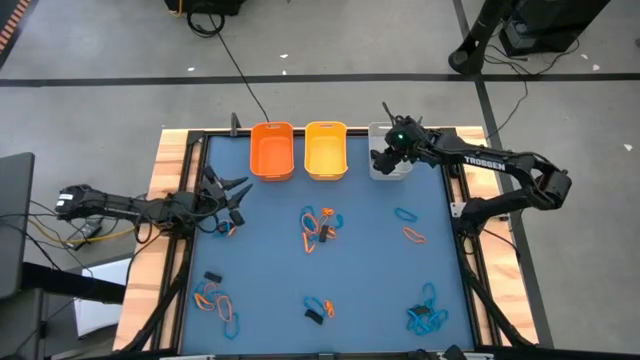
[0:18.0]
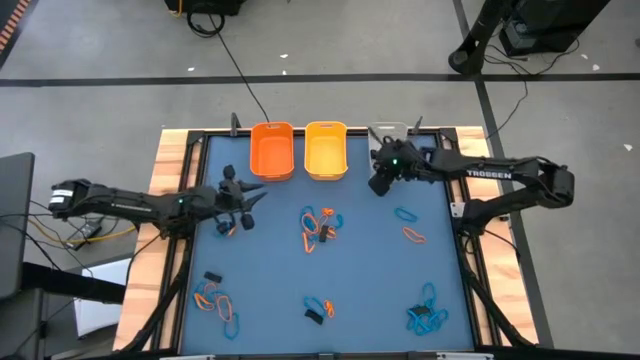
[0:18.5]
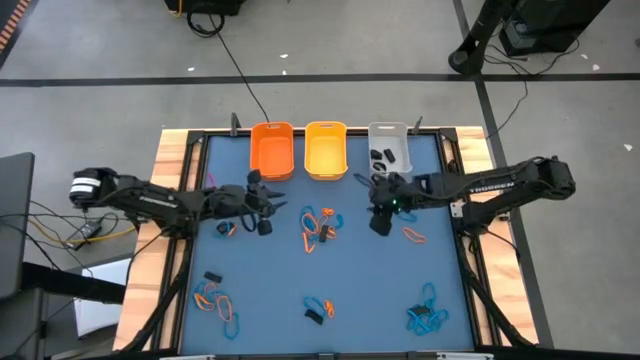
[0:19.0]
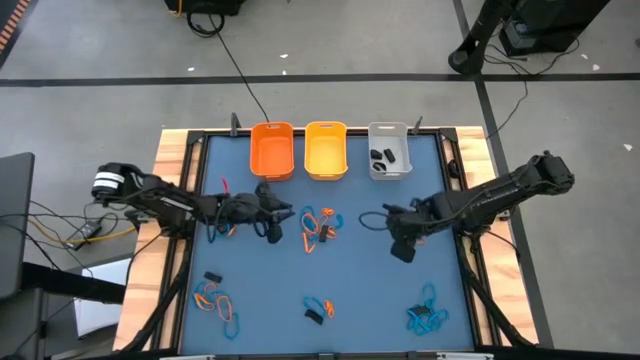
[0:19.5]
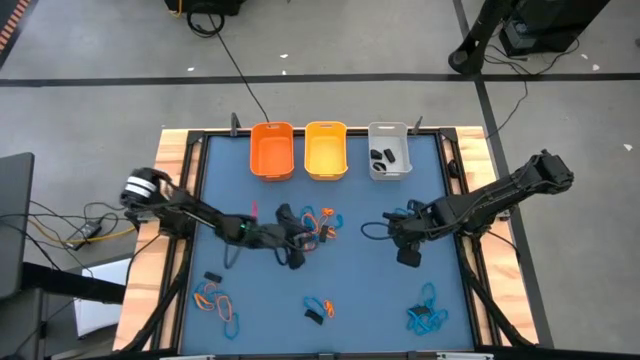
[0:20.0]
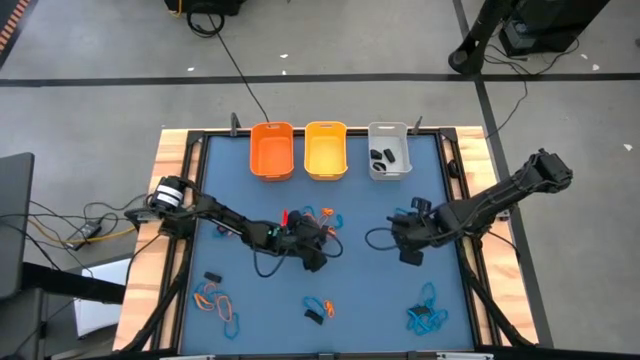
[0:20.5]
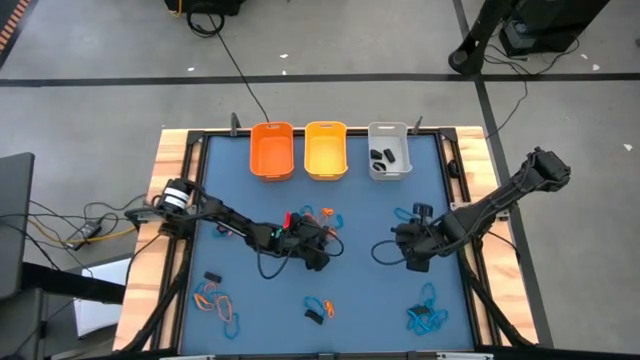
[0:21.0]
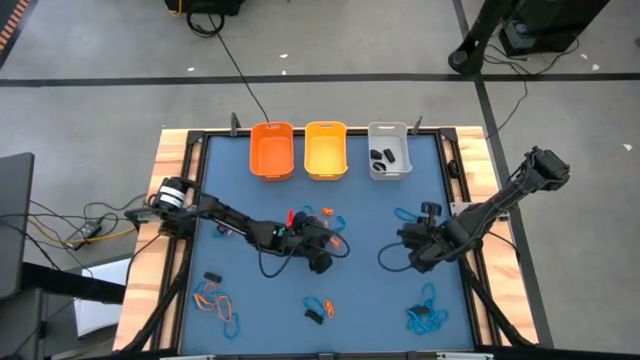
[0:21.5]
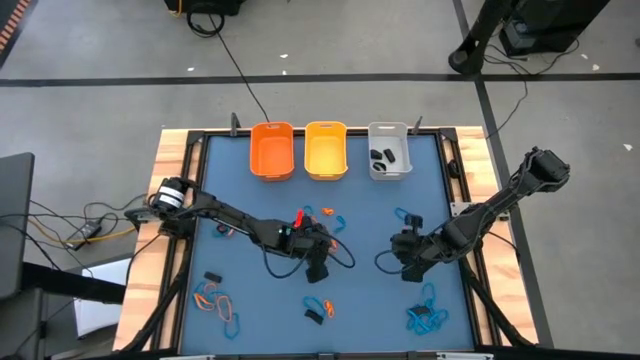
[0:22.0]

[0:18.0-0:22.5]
Task: Sort rubber bands into baskets
Put the black rubber band into the gray bin

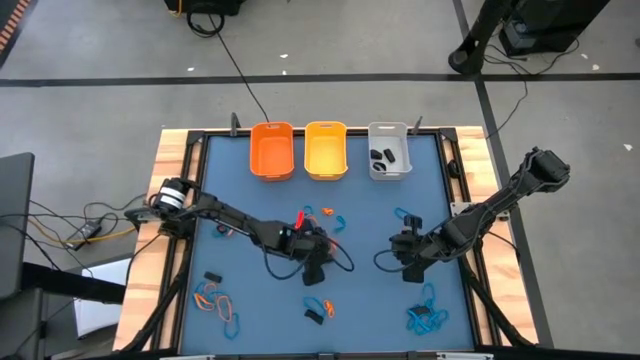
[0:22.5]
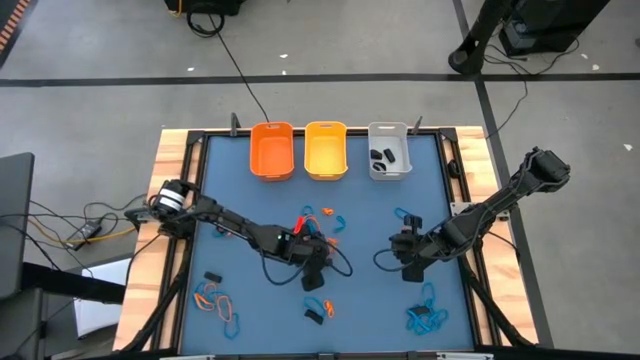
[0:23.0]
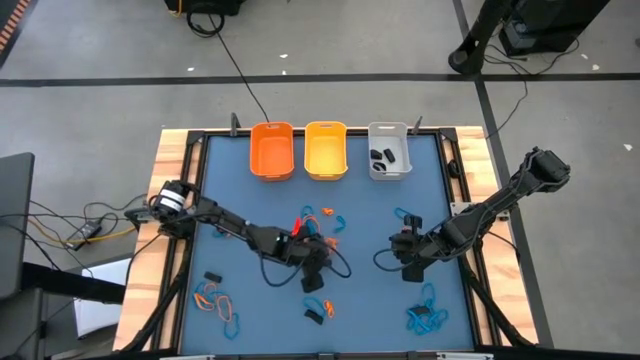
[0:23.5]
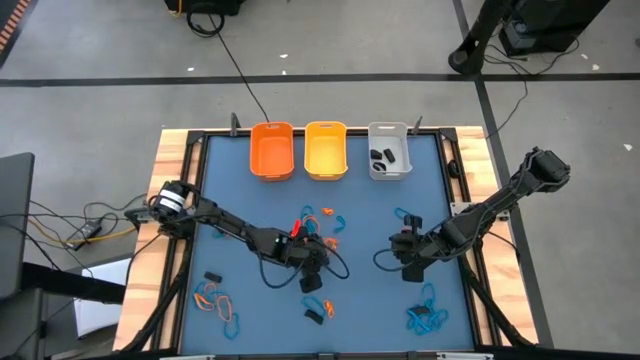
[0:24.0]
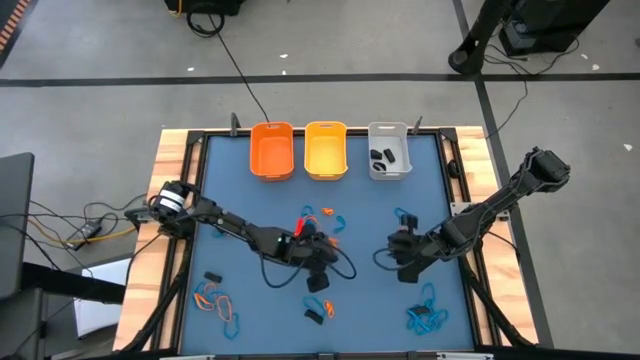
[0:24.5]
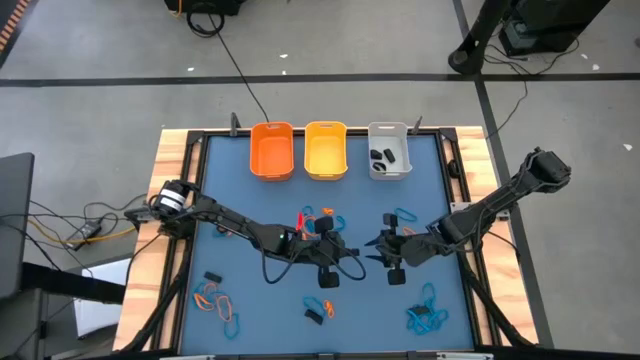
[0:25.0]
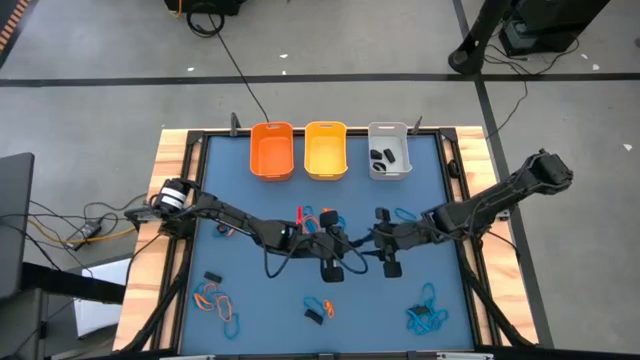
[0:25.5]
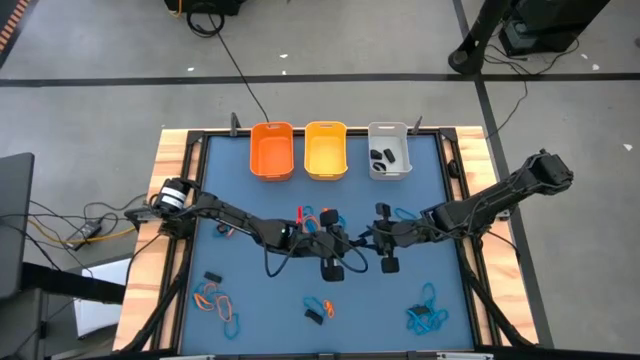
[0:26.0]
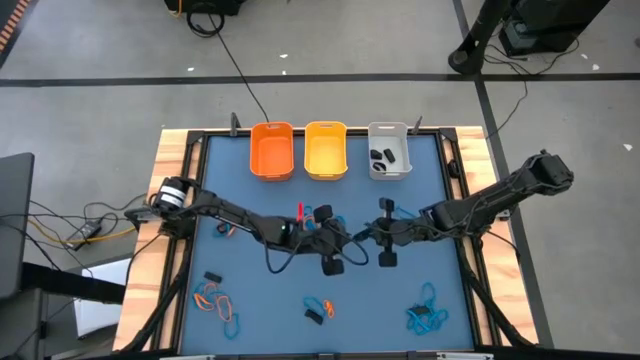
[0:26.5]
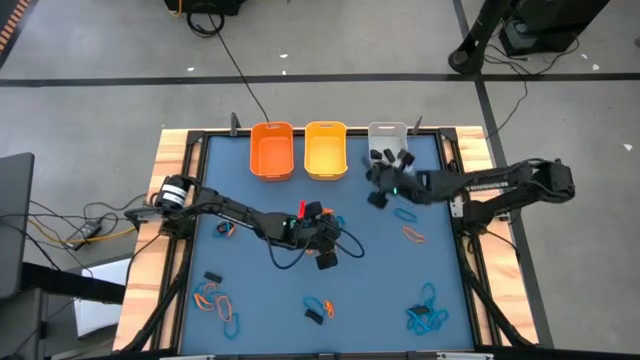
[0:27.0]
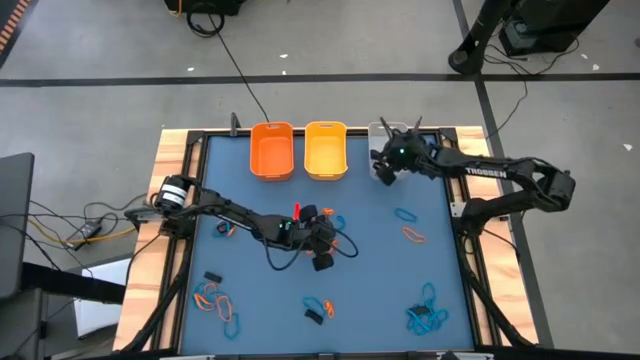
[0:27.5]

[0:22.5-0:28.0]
Put the black rubber band into the gray bin

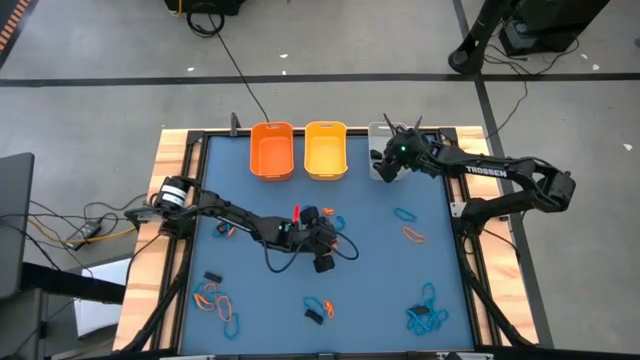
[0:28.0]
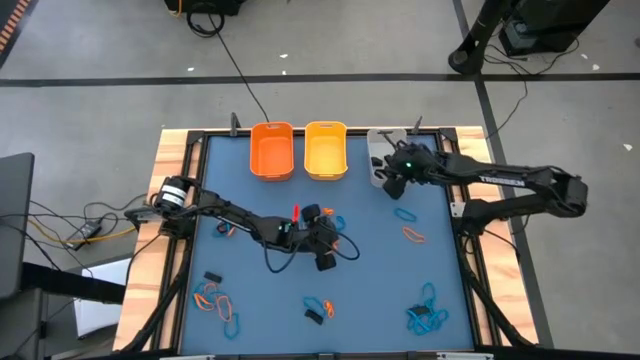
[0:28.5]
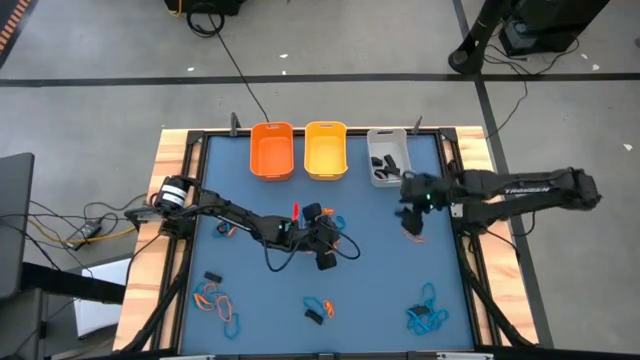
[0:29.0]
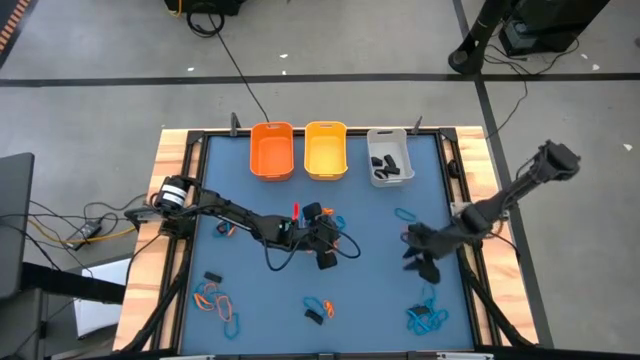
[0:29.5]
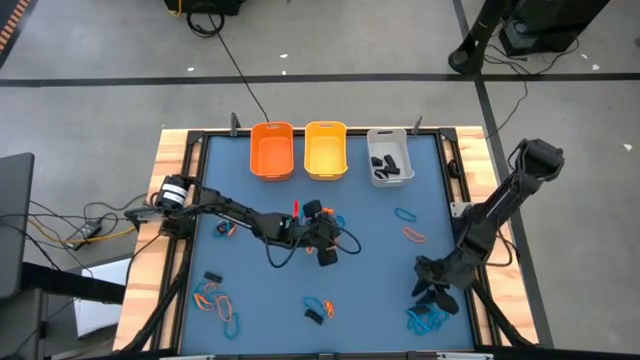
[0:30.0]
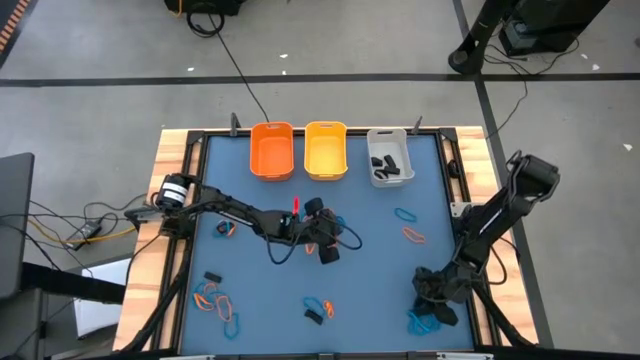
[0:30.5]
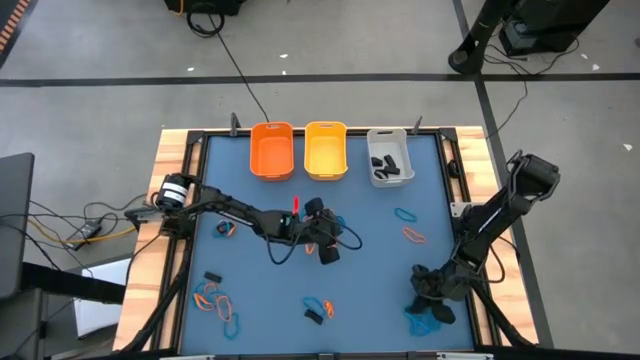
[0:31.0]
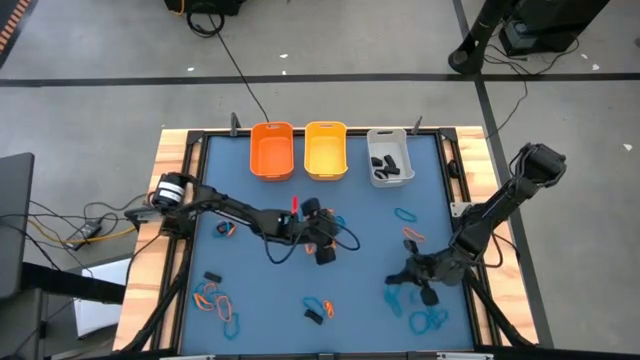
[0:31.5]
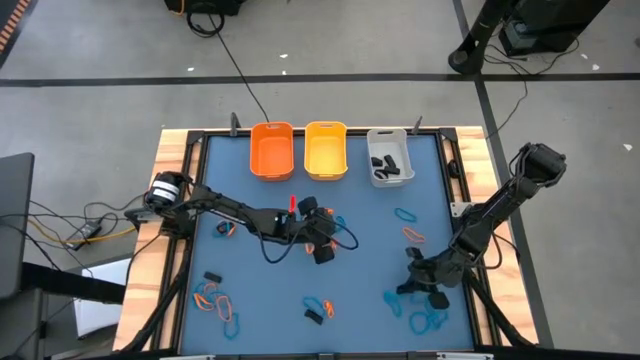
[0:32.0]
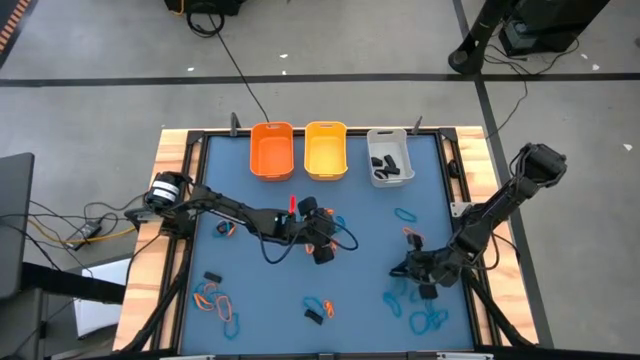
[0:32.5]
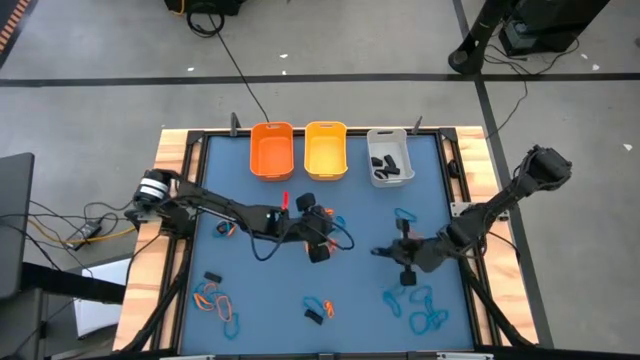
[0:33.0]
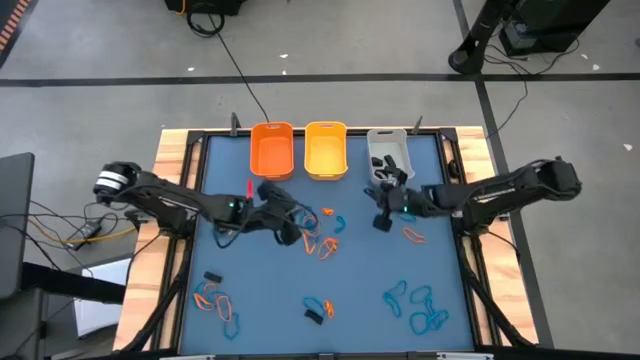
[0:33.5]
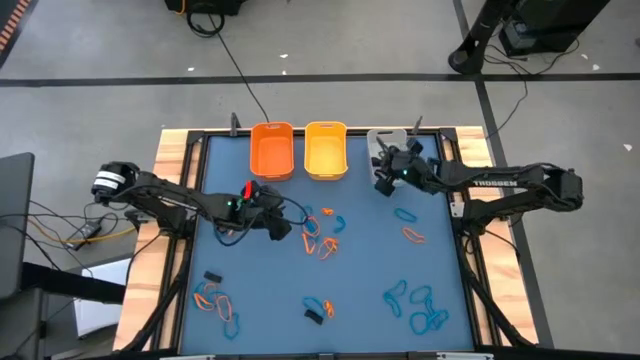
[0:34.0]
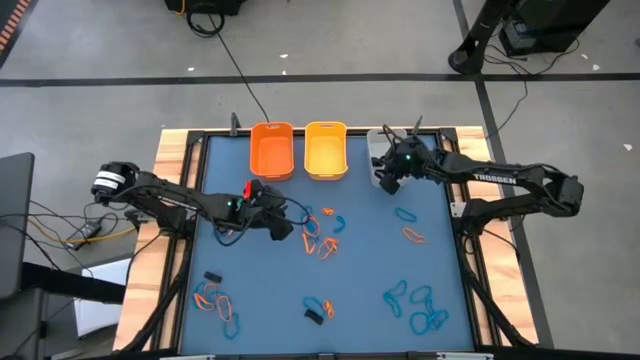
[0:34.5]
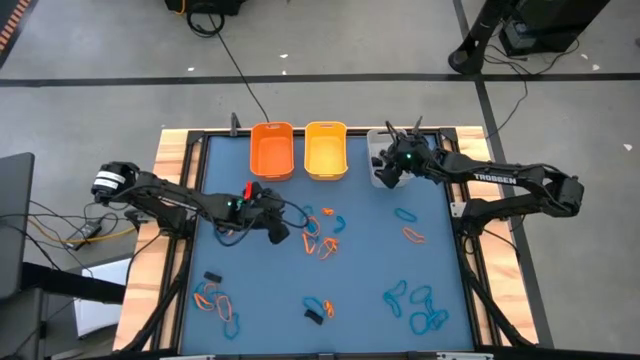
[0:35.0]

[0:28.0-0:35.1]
Put the black rubber band into the gray bin

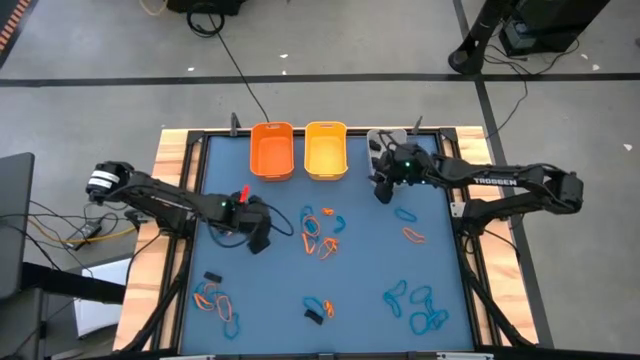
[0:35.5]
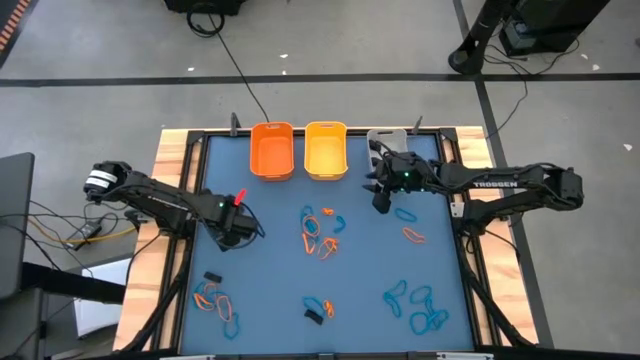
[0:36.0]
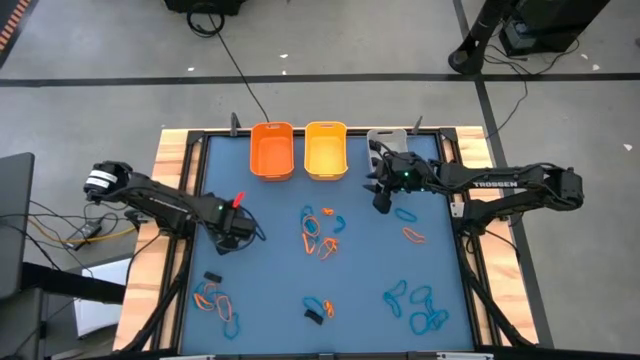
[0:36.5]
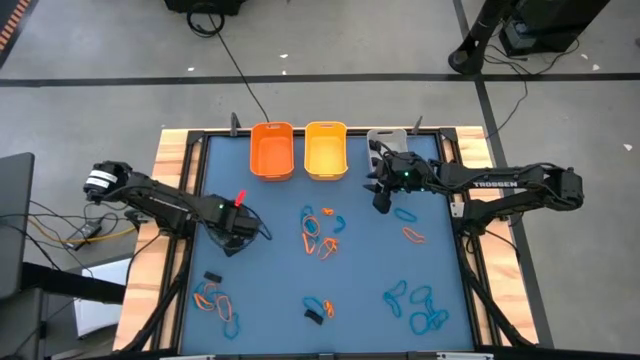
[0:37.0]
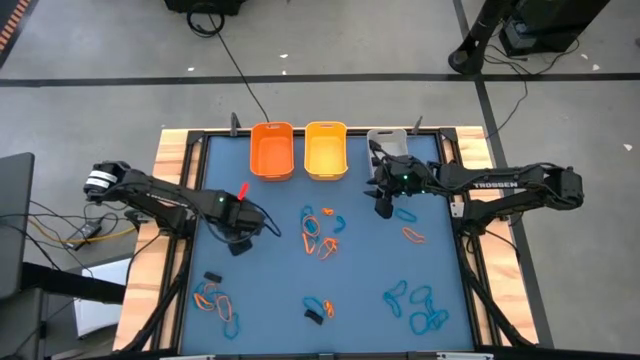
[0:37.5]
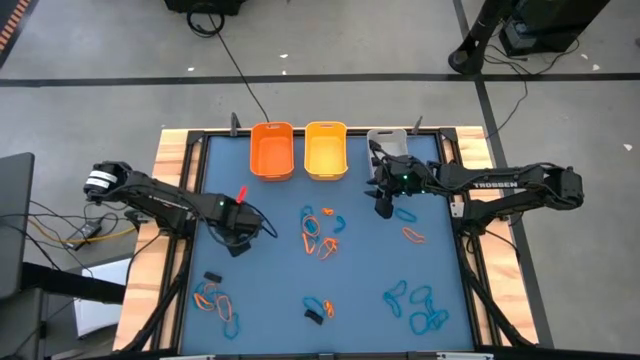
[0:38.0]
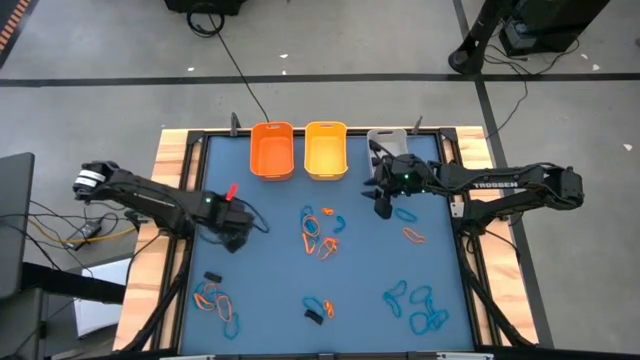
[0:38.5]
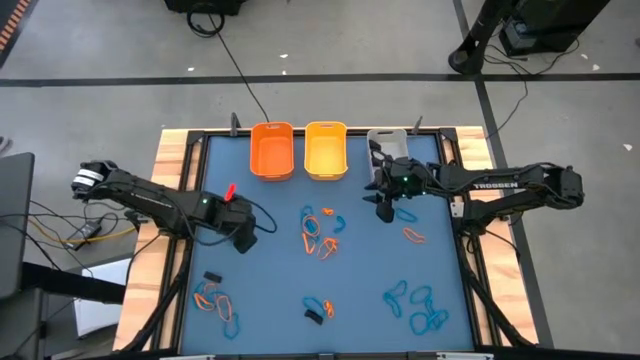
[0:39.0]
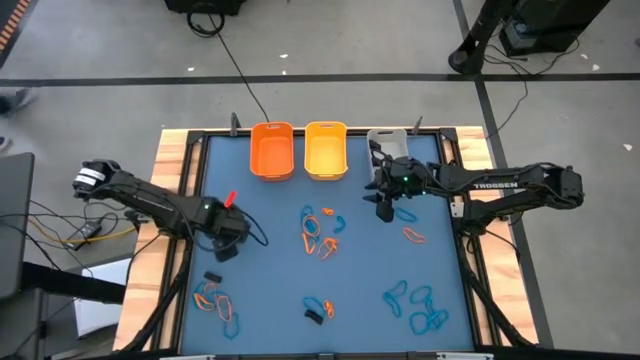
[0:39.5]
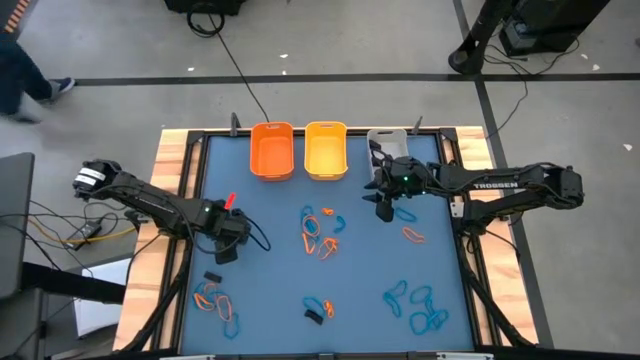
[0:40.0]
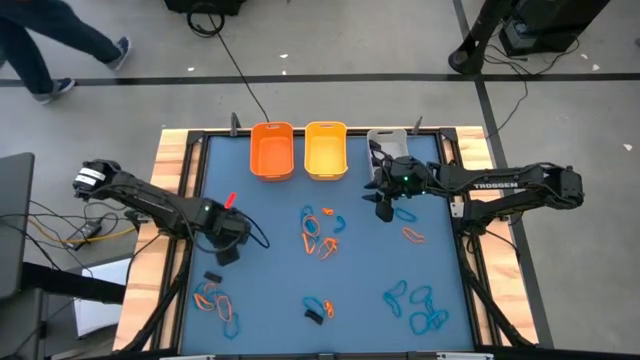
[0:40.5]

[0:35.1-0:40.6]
Put the black rubber band into the gray bin
